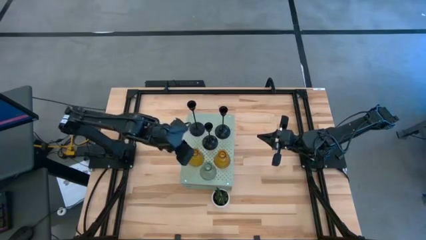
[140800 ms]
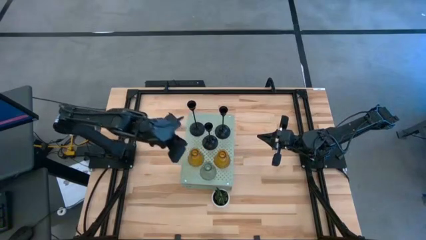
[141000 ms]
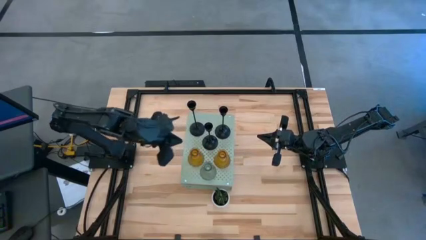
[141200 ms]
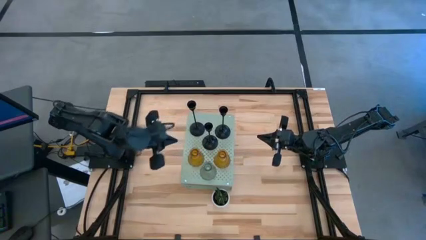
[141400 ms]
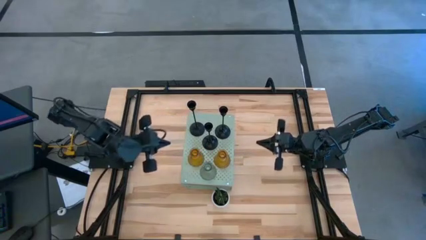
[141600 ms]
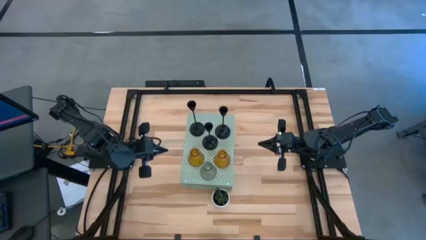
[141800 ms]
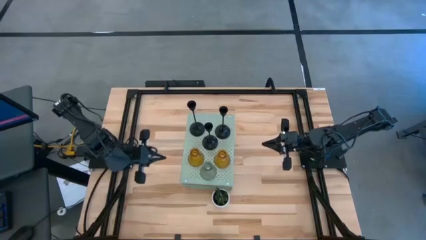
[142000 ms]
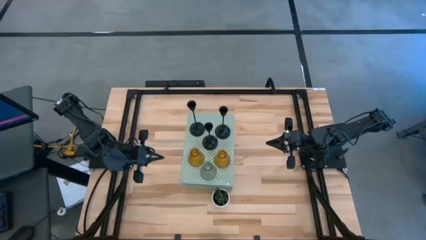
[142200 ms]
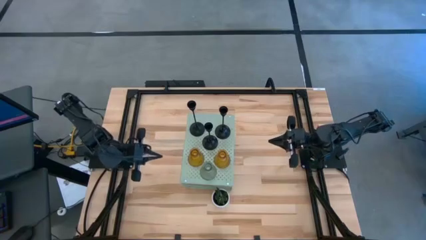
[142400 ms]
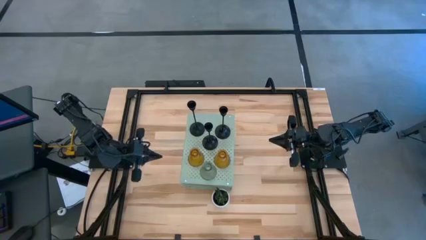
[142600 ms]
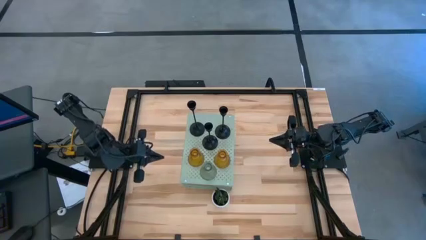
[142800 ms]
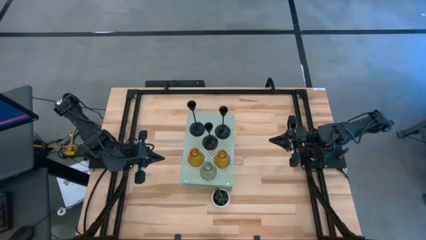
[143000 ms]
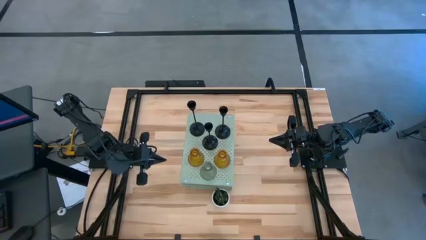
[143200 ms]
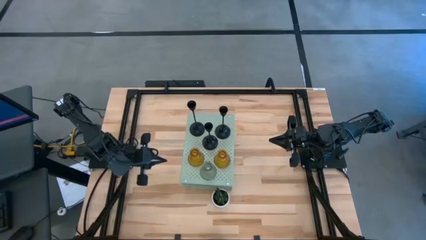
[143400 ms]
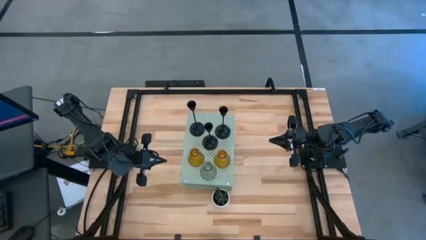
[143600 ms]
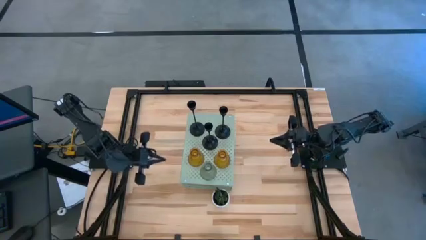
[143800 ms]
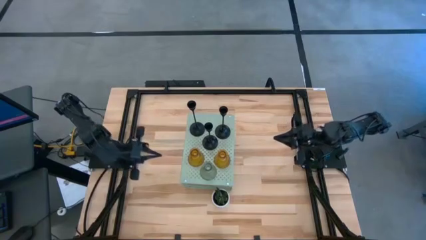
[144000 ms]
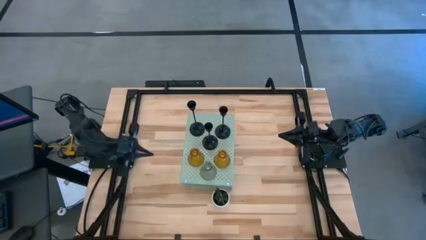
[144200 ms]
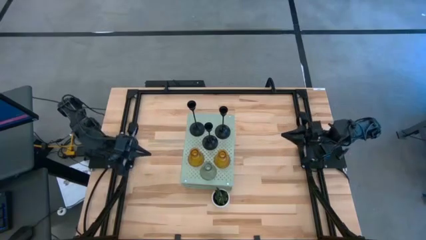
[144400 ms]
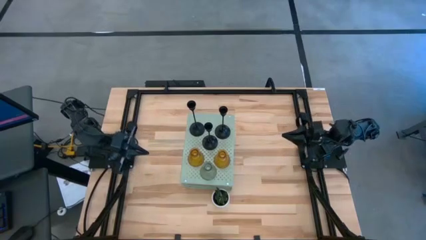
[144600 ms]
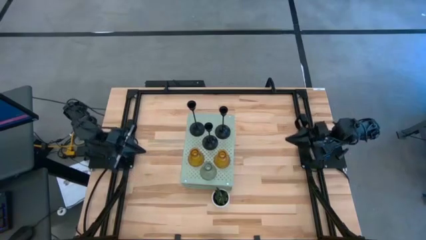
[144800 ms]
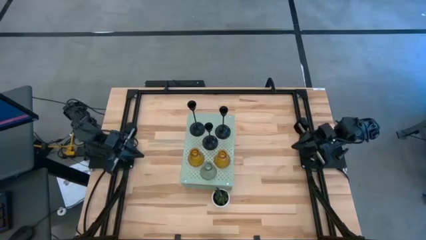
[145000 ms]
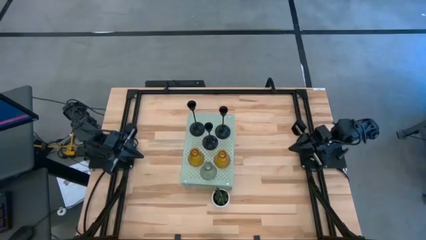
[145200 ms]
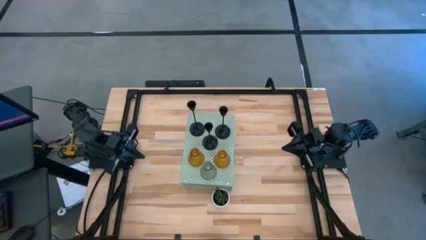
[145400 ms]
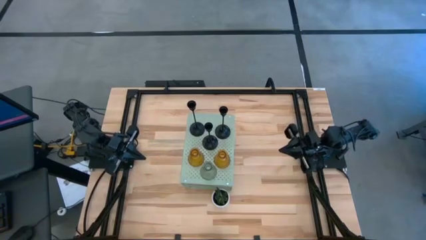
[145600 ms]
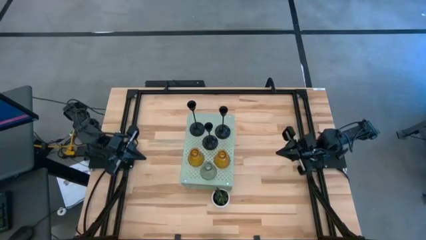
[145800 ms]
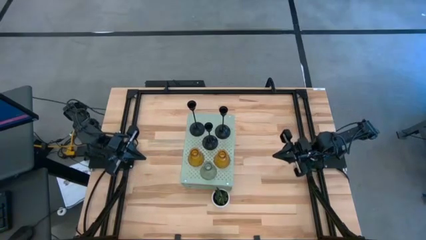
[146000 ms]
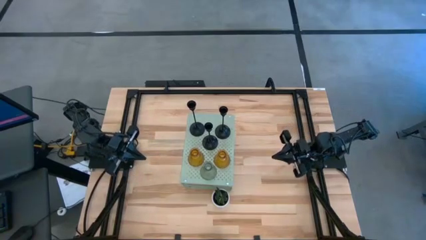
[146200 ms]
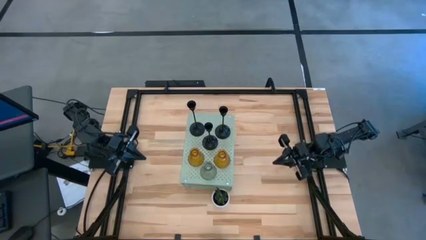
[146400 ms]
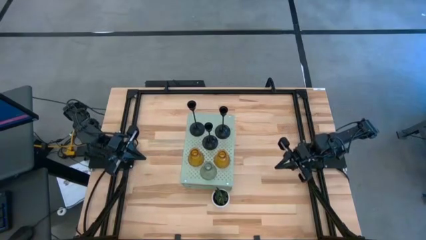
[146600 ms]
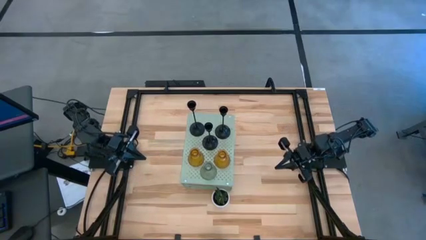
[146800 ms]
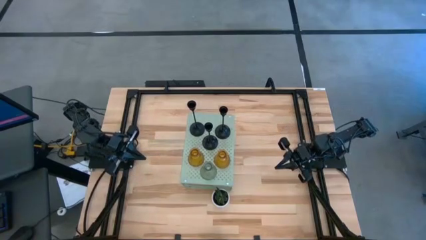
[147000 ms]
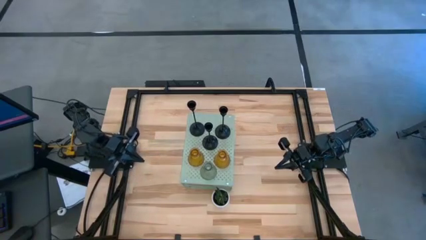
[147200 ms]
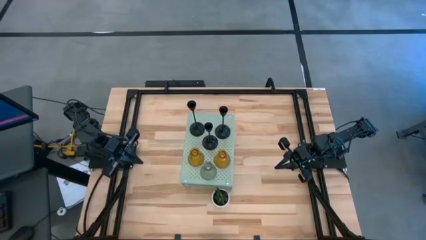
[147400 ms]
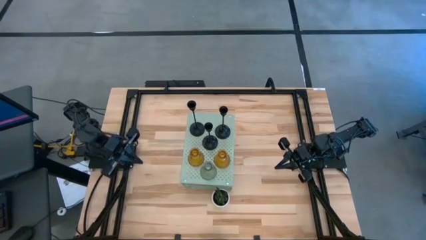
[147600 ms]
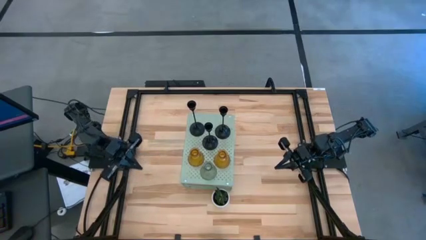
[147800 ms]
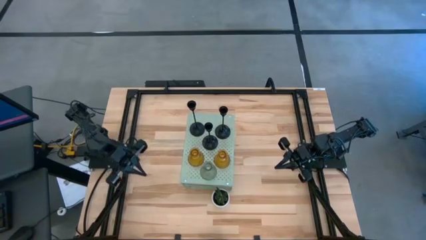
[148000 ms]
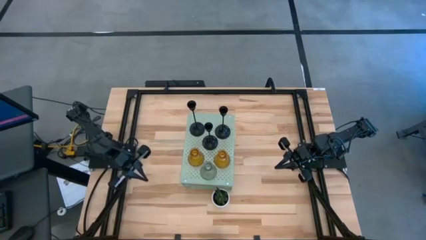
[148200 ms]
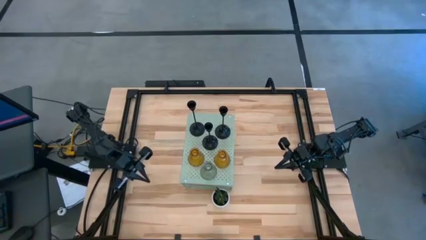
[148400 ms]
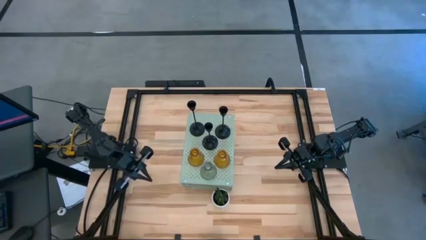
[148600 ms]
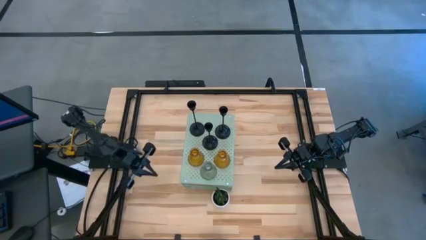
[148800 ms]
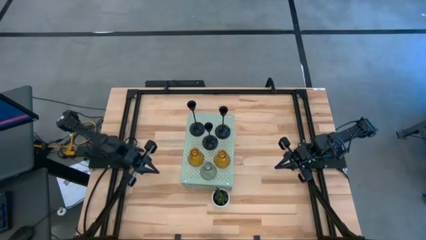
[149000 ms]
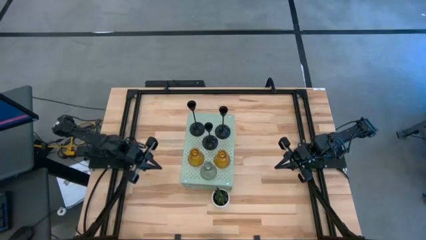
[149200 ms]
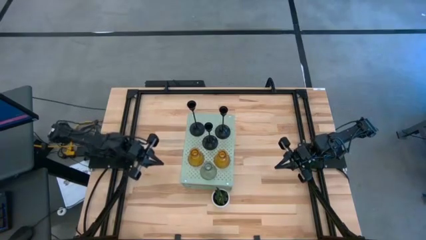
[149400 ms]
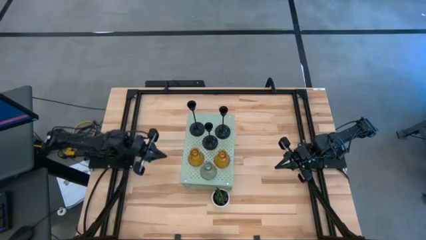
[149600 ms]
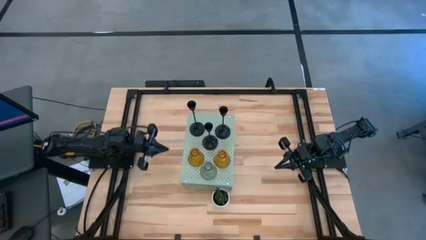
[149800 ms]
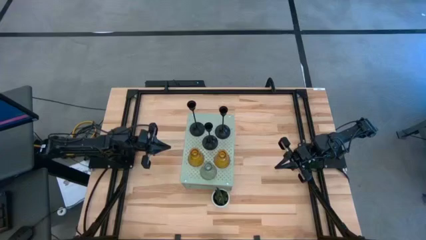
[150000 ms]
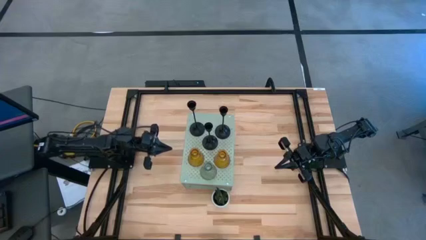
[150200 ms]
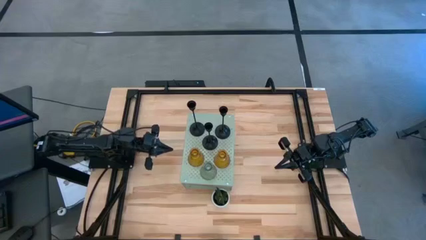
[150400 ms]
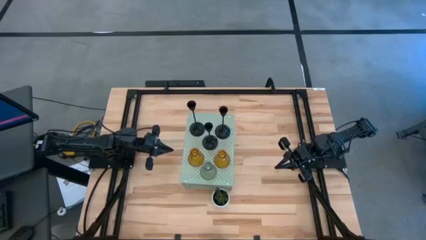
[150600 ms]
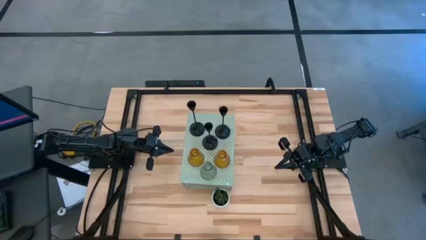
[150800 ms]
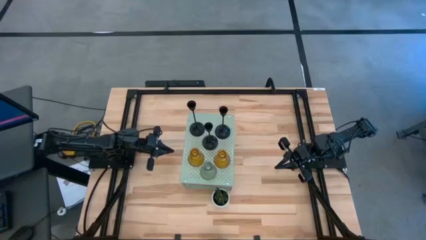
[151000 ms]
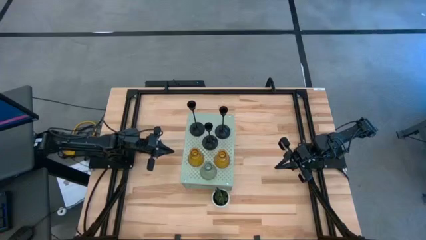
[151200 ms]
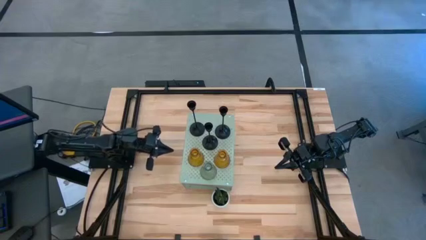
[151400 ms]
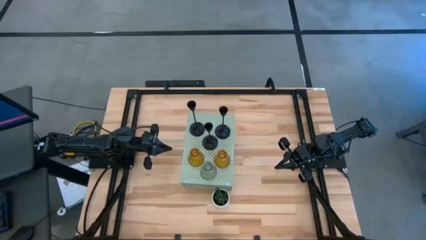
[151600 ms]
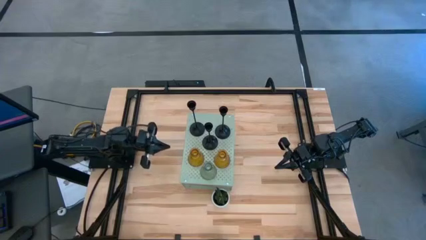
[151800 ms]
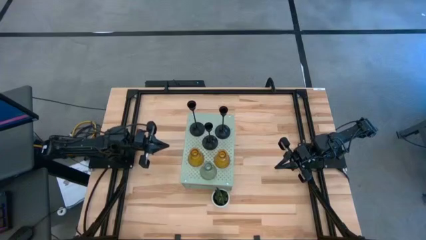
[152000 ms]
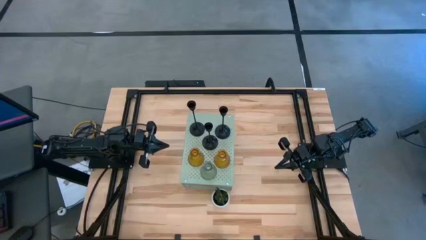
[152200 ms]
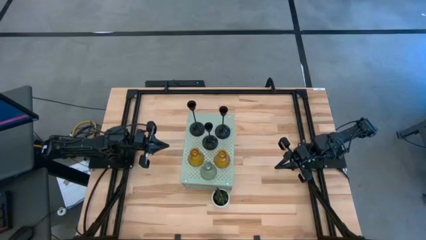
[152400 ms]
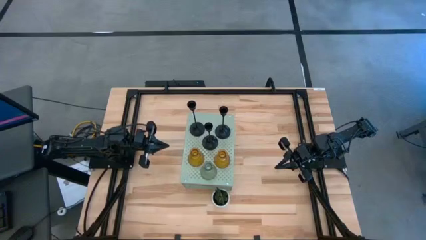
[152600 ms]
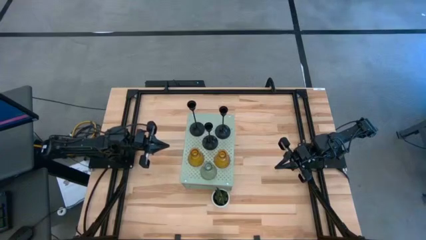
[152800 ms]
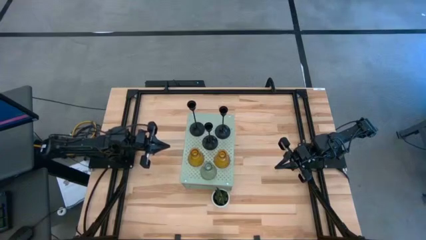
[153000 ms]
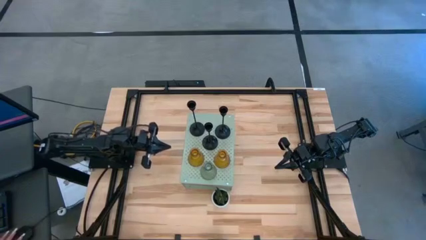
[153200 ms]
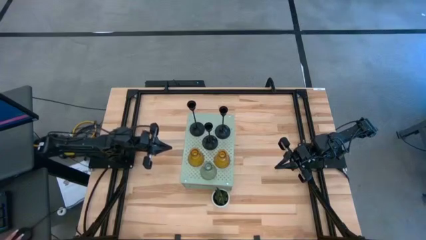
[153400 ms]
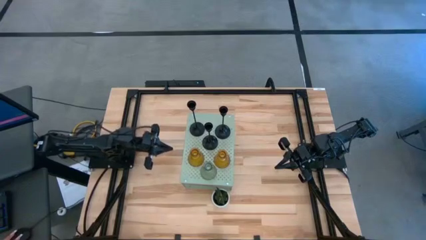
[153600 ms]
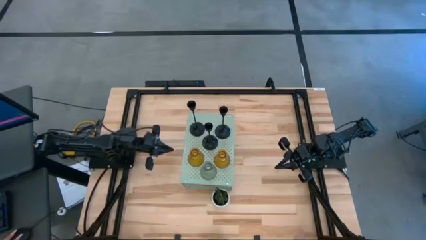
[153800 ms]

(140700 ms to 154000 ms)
Task: Pick & Place candle stick holders
Return to Home Position

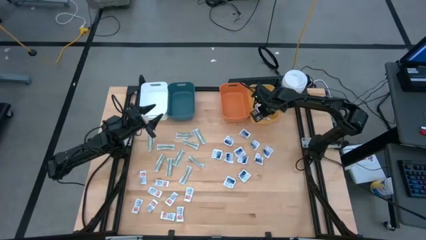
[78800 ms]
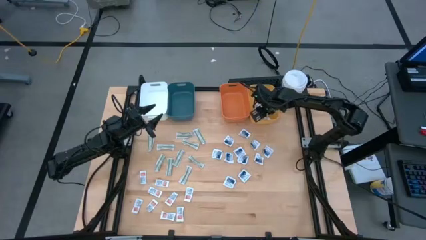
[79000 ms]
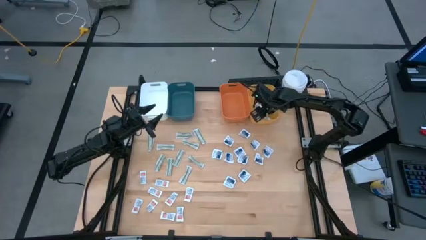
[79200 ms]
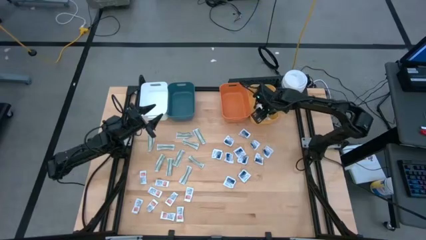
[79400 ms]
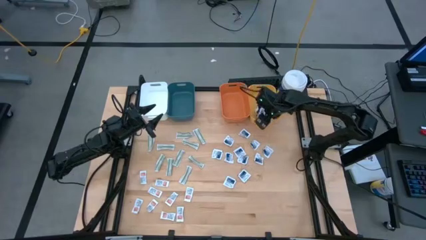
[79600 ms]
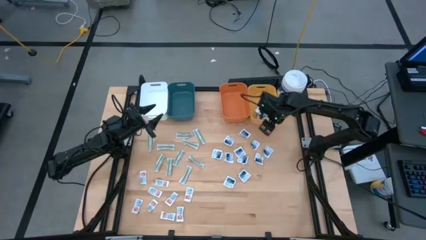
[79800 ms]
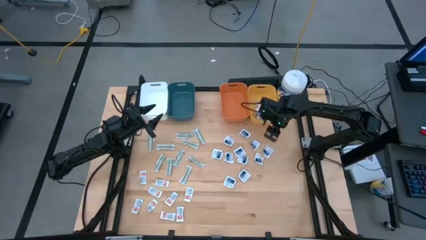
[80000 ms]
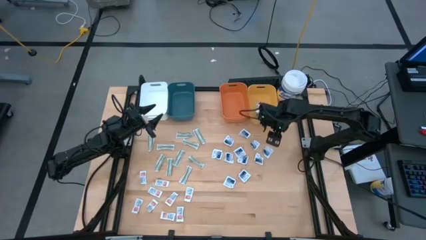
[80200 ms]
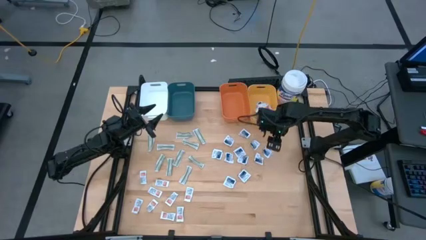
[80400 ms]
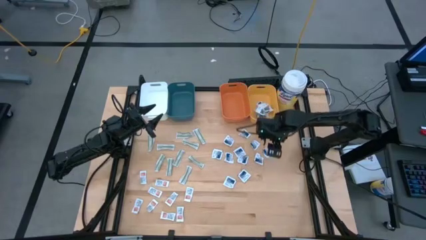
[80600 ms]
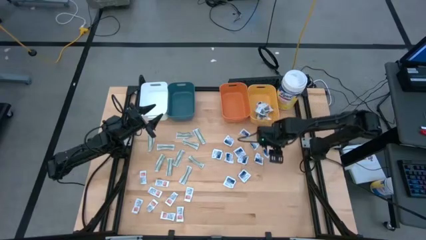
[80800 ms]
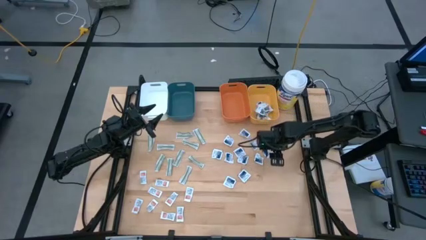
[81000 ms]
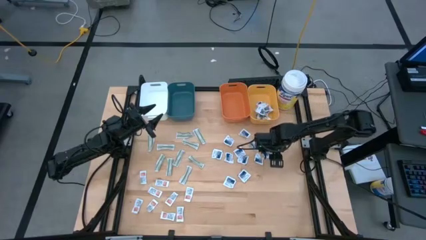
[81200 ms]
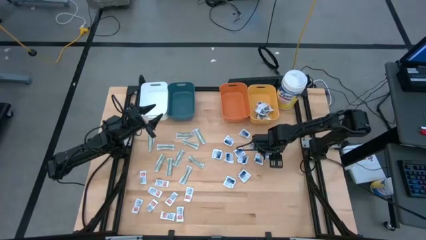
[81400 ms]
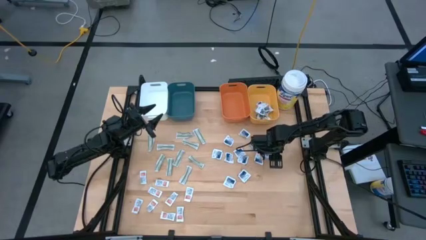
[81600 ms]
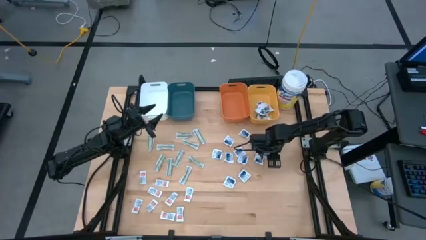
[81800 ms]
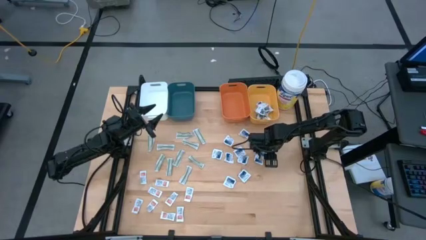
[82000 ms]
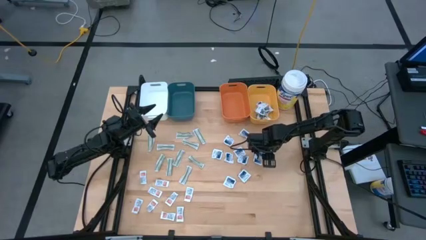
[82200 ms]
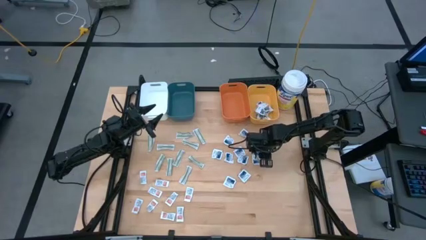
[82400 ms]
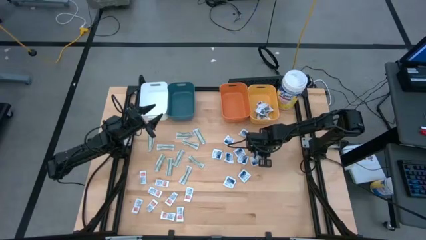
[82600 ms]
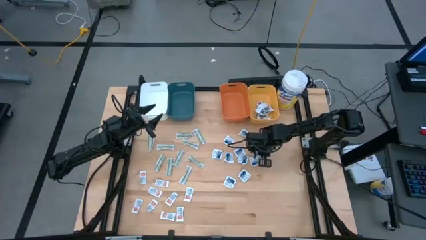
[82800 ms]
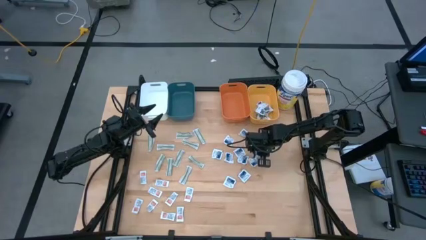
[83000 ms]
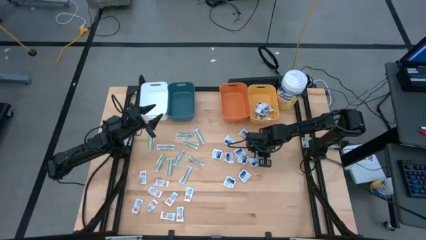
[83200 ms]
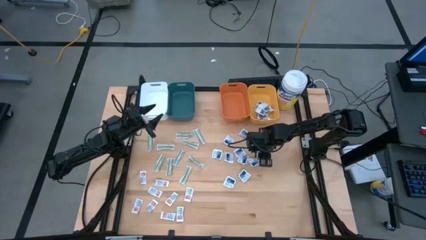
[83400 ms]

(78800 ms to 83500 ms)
Task: Pick & Place First Aid Supplies
Put the alcohol pad into the yellow bin
